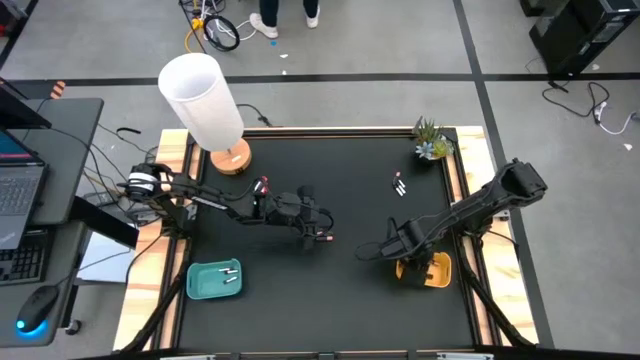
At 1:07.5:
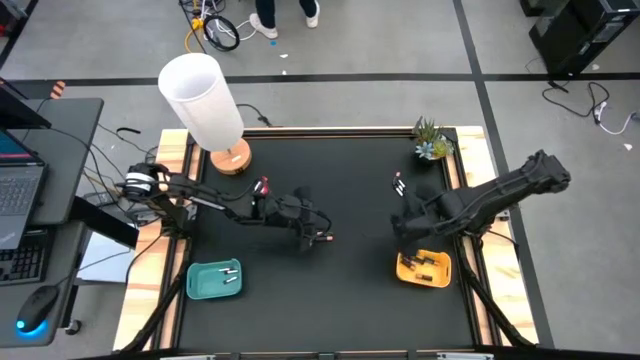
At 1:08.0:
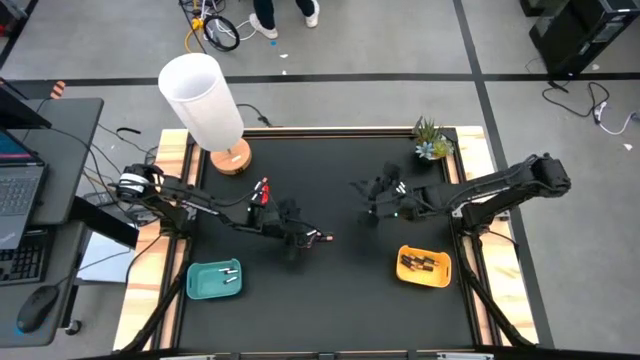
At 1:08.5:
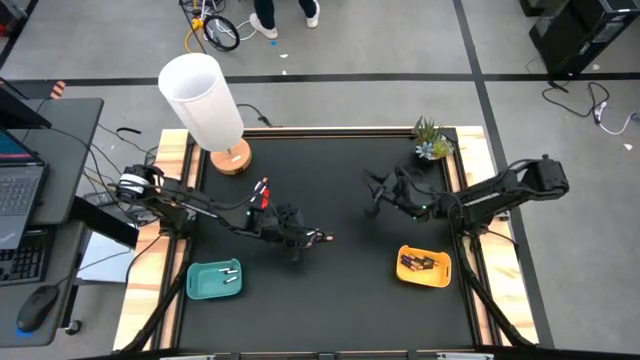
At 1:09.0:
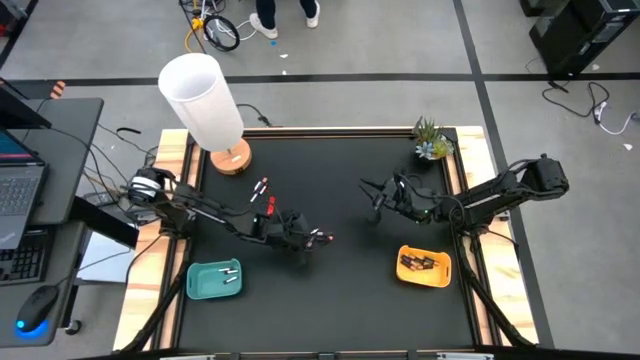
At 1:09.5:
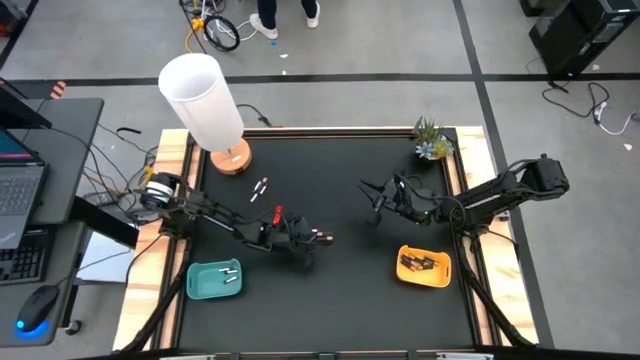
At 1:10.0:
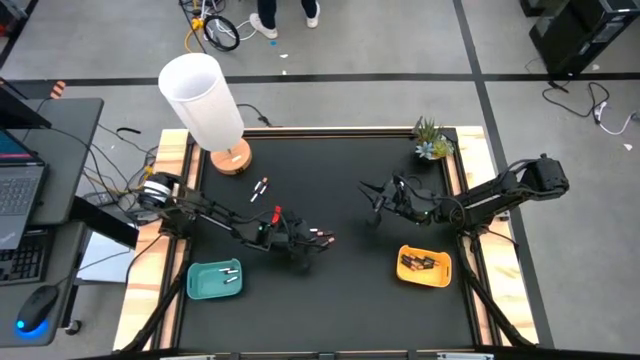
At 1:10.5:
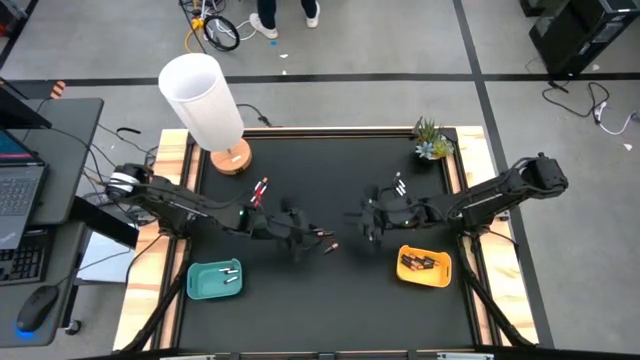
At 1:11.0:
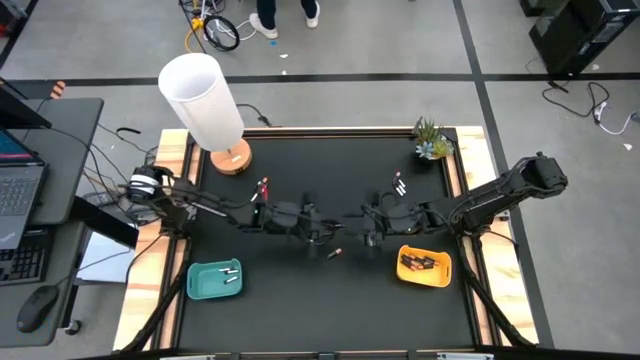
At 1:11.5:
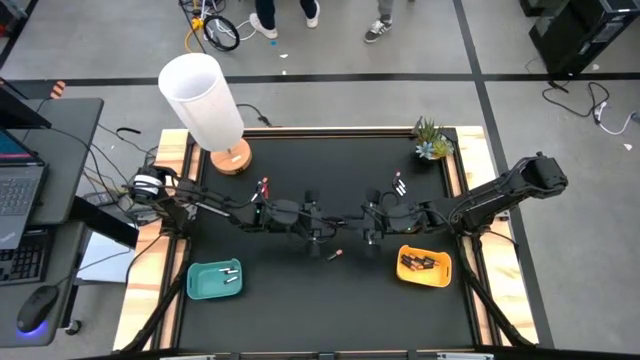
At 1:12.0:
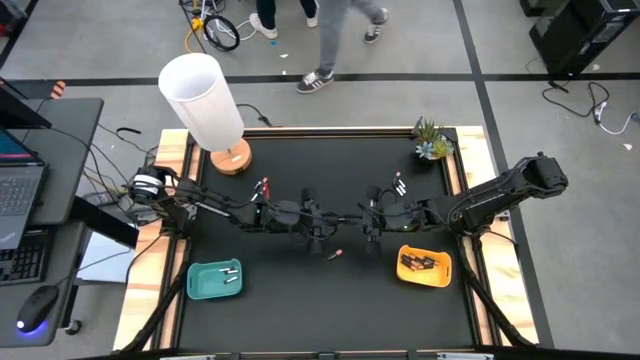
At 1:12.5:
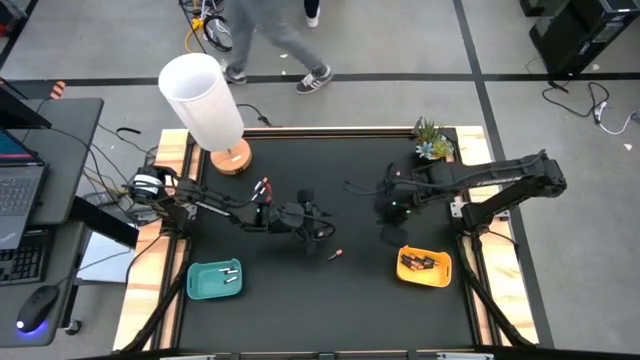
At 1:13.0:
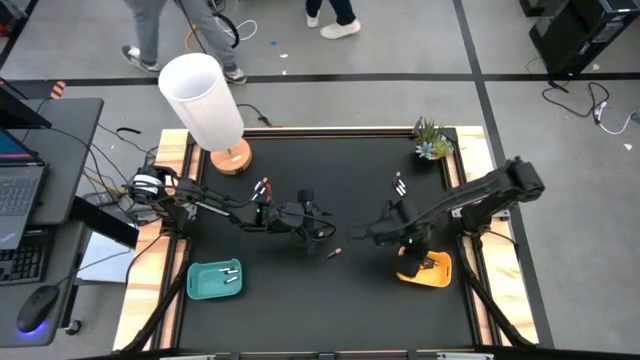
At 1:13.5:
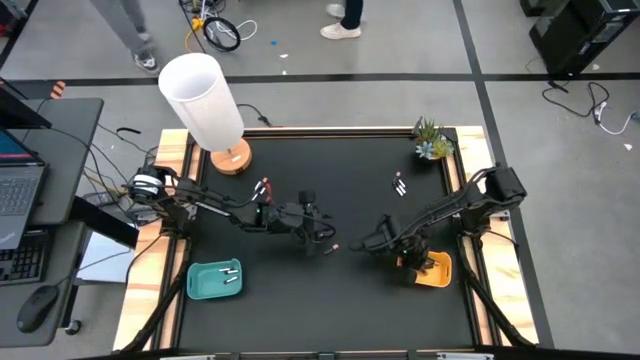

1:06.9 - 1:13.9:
Task: Sort batteries
Put the black battery into the yellow bin

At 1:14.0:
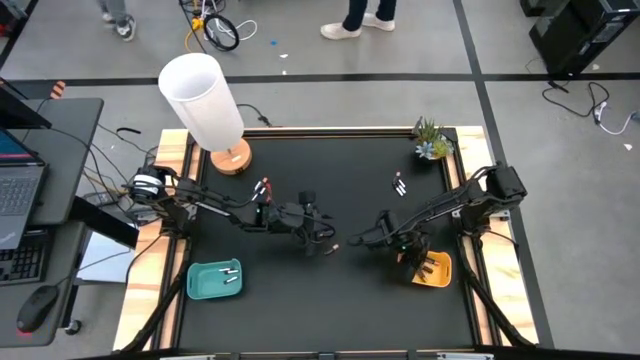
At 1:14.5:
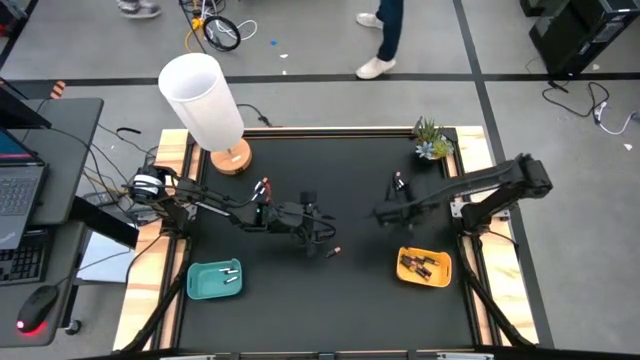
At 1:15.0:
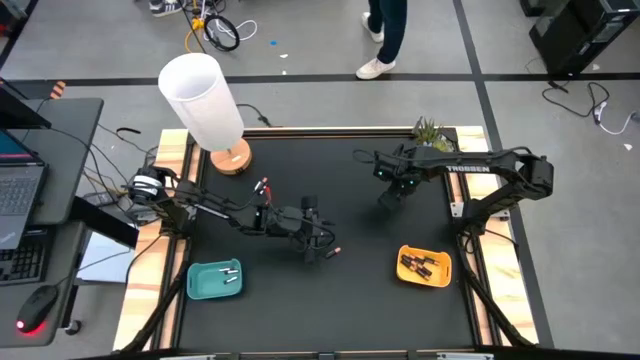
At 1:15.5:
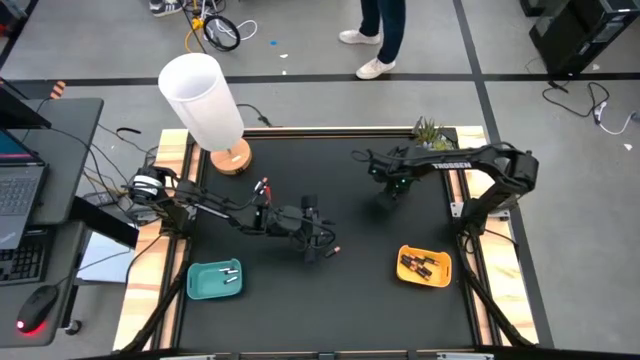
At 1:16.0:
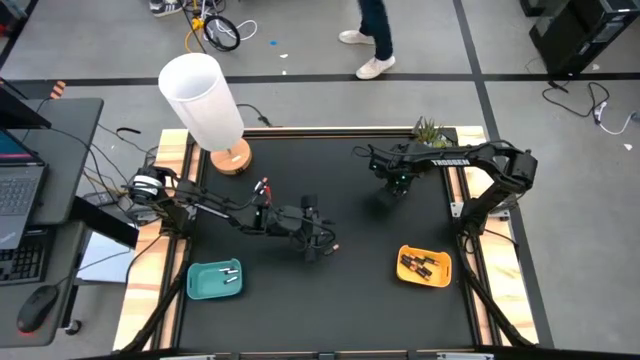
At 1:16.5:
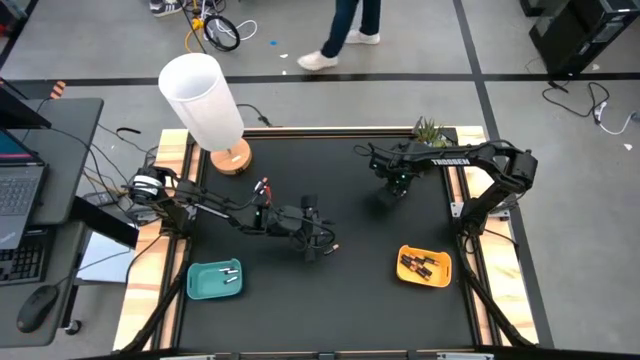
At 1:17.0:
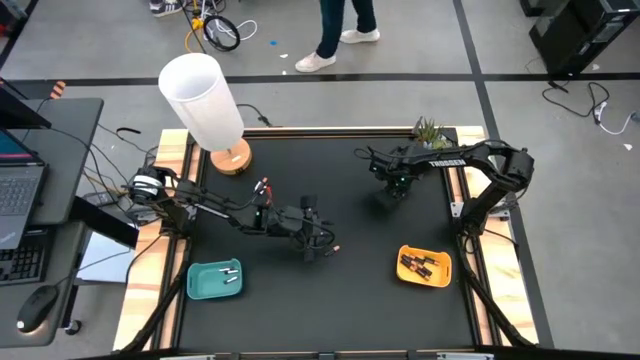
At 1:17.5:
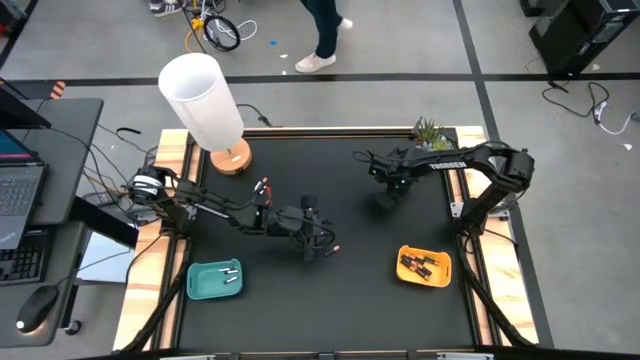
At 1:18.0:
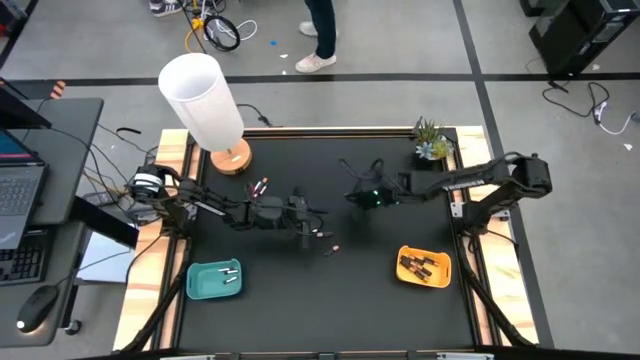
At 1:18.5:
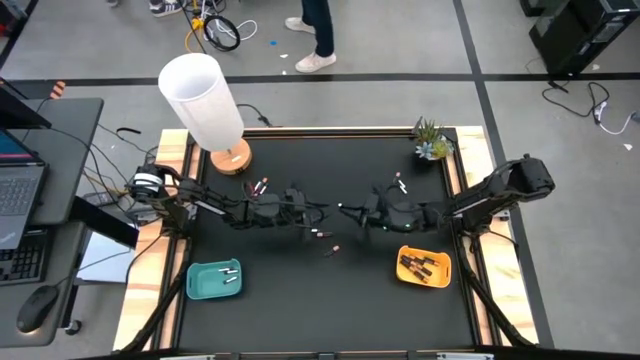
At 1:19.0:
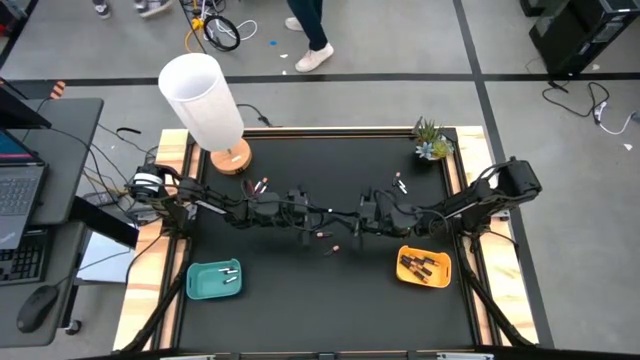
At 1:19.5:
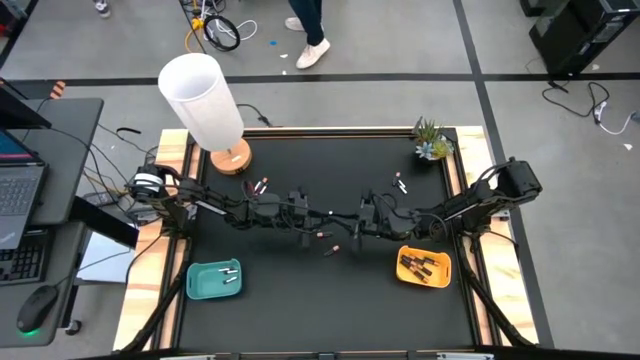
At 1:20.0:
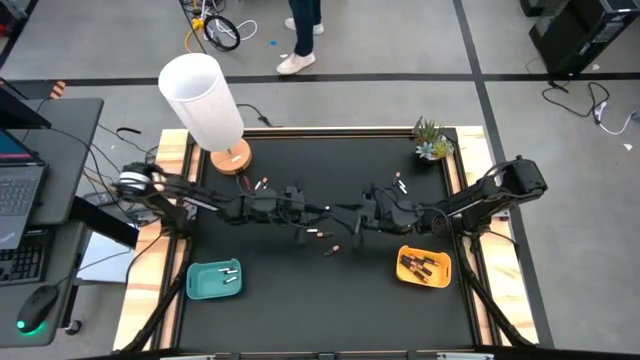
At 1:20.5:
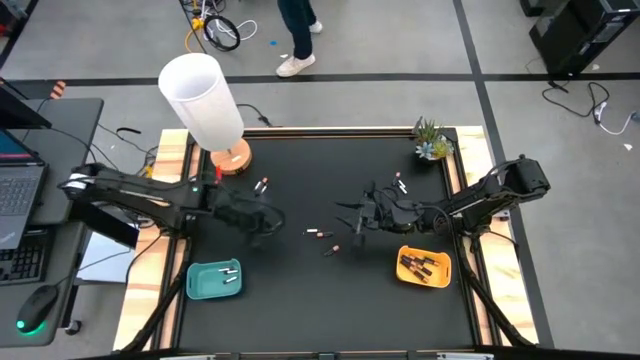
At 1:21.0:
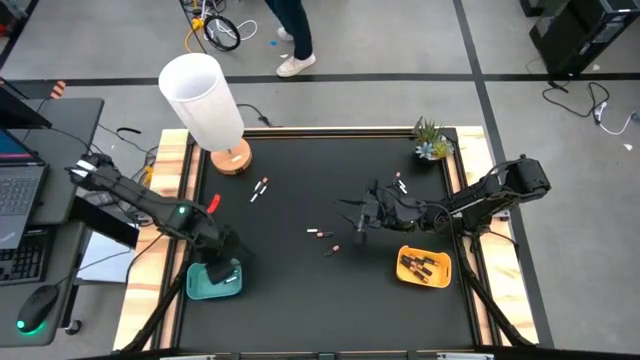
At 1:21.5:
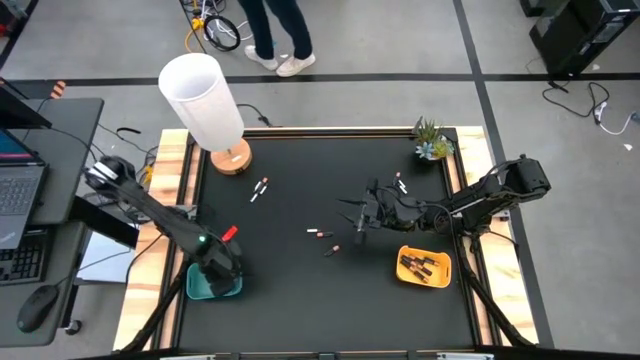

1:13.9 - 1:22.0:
Put the silver battery into the green bin

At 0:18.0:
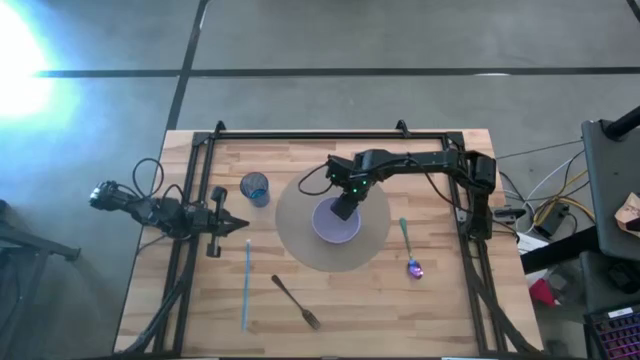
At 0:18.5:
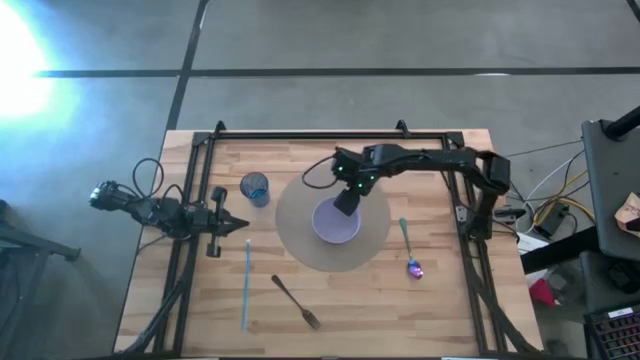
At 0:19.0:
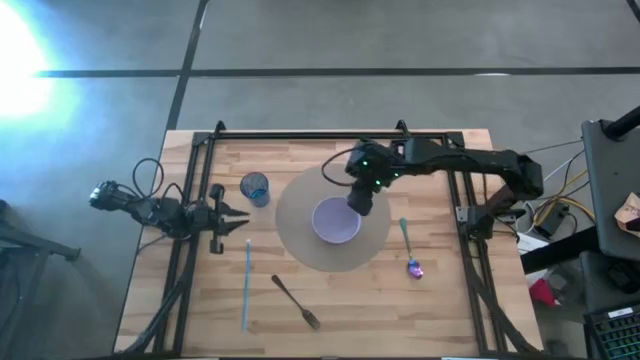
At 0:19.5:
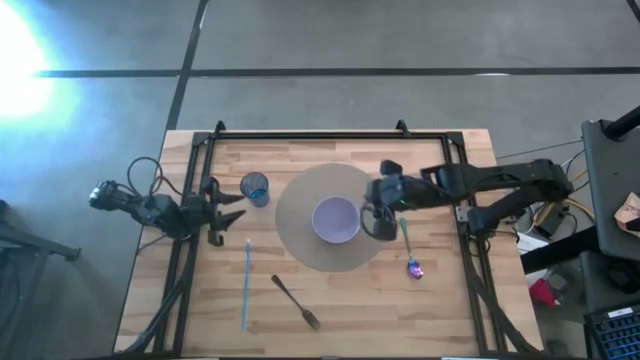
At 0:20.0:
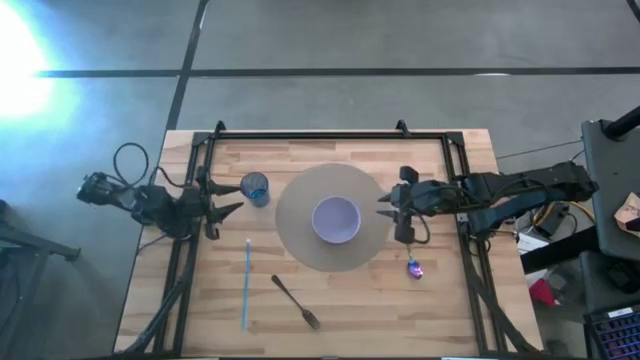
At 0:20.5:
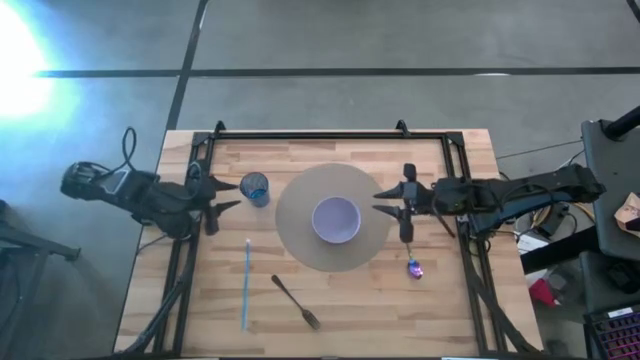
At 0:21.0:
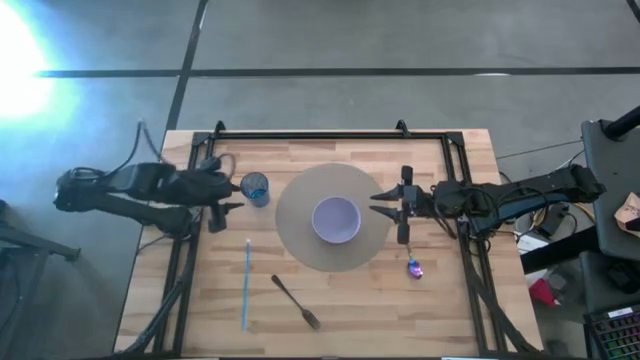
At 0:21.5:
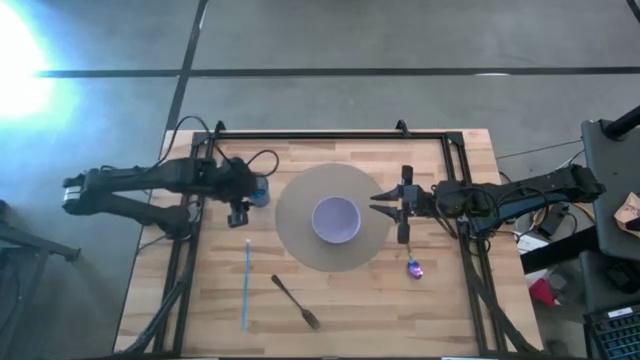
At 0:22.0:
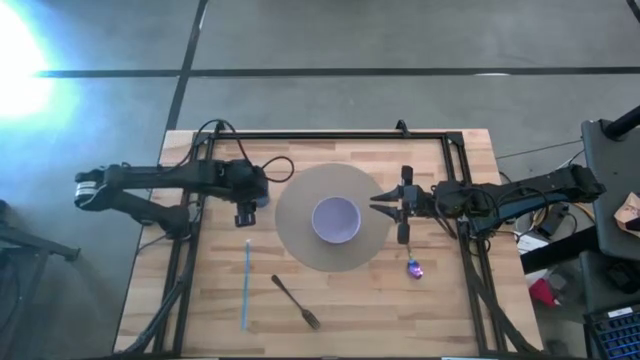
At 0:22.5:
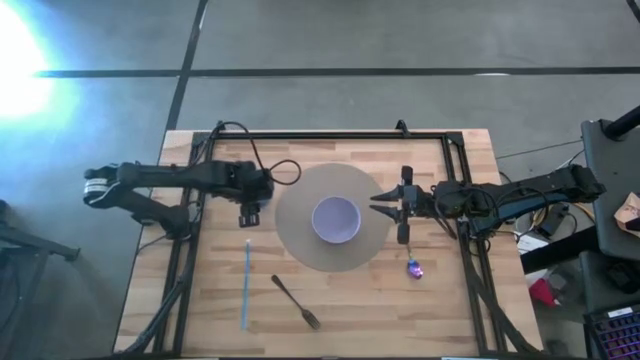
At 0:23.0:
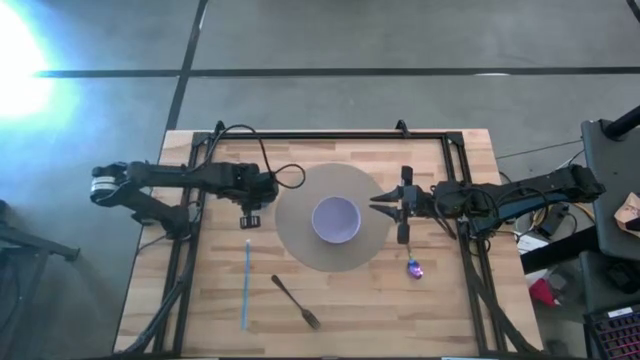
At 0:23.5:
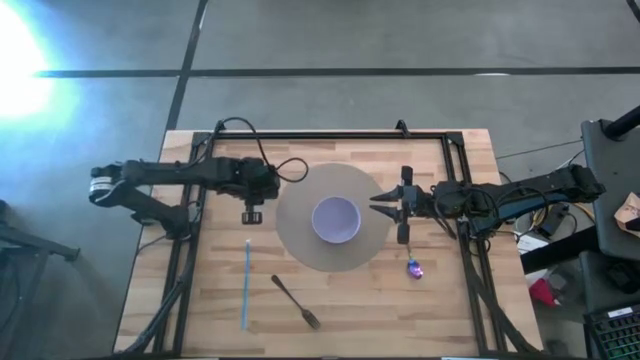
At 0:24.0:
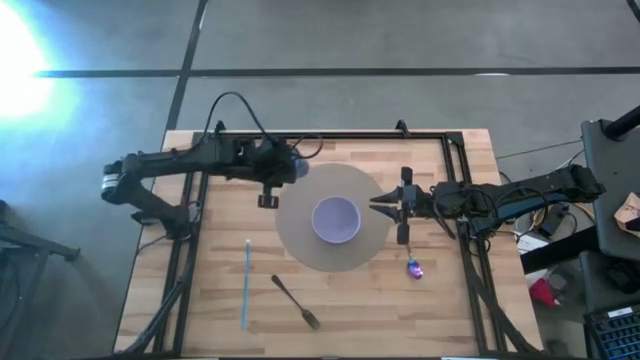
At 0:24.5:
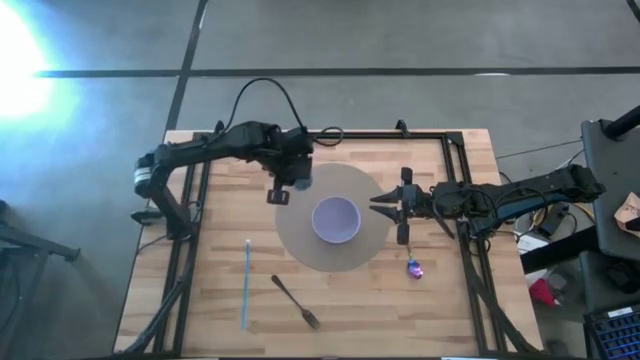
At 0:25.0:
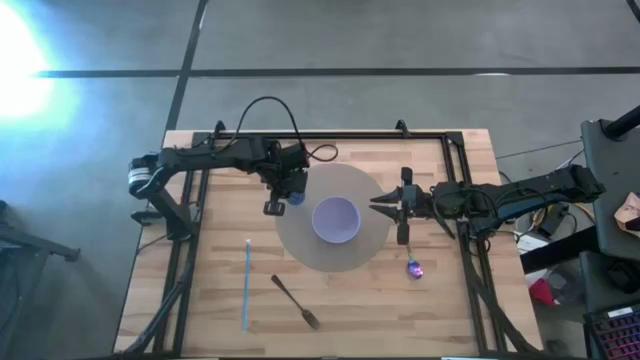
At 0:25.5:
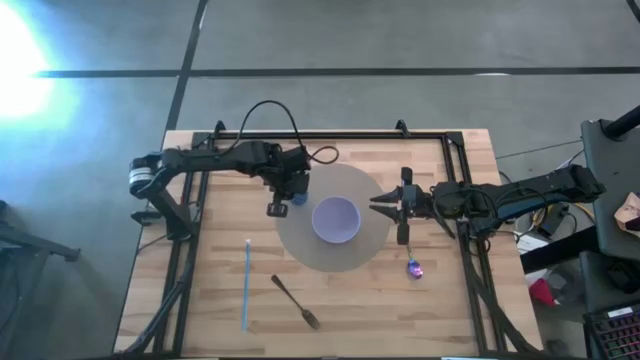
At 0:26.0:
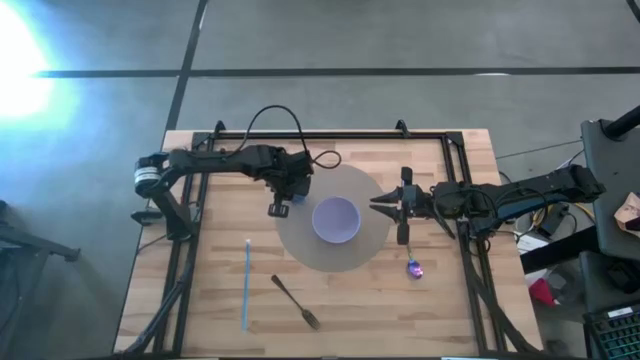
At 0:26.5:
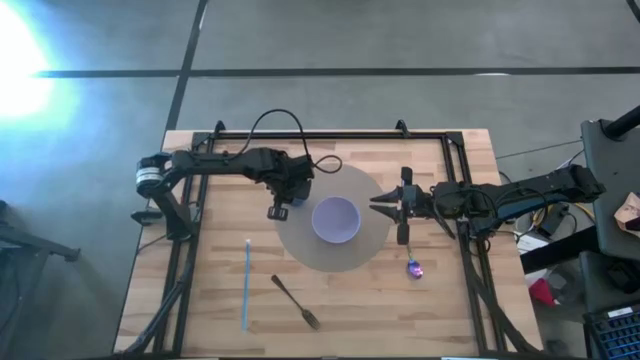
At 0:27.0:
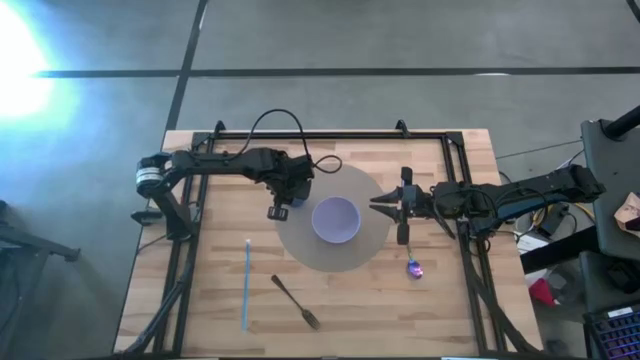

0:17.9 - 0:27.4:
Task: Pick & Place Utensil
Put the blue cup on the gray table mat to the top left of the purple bowl
